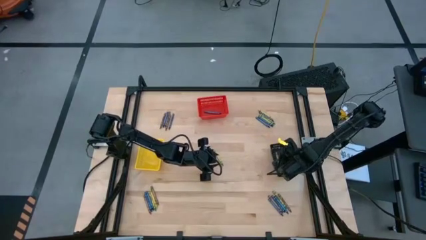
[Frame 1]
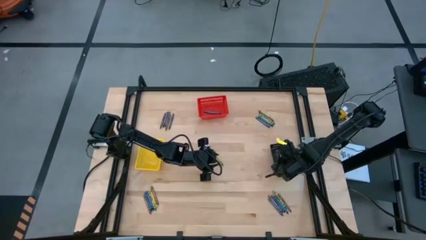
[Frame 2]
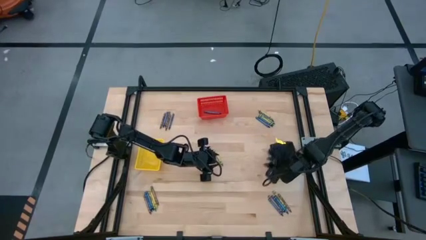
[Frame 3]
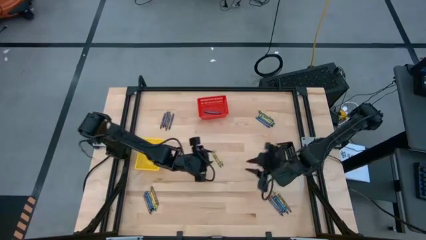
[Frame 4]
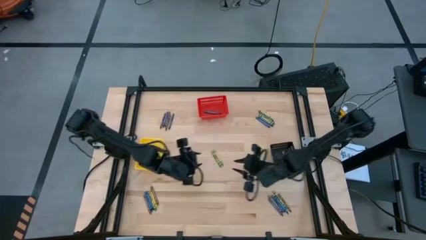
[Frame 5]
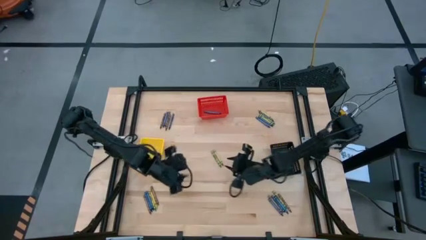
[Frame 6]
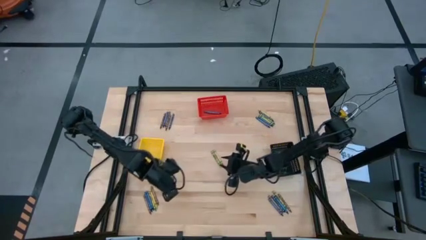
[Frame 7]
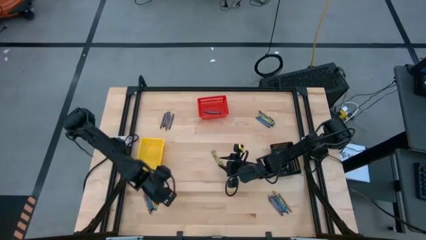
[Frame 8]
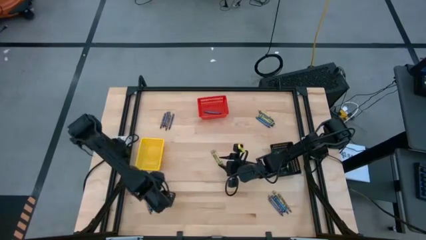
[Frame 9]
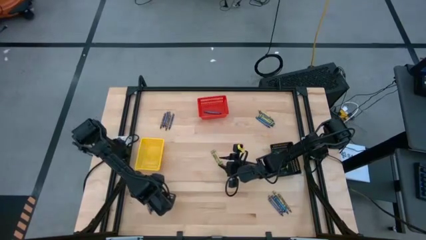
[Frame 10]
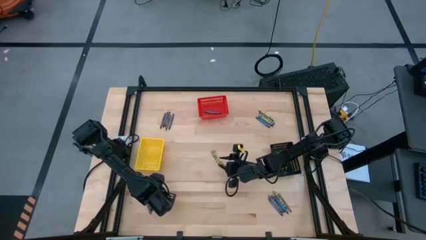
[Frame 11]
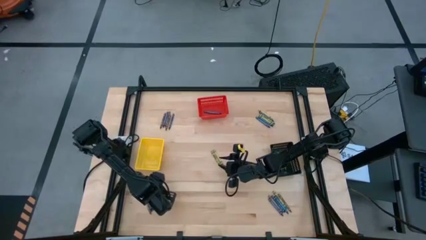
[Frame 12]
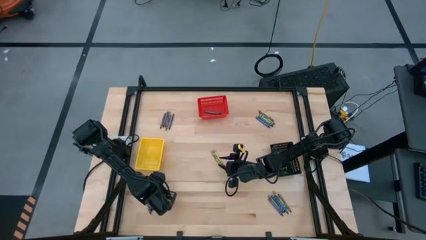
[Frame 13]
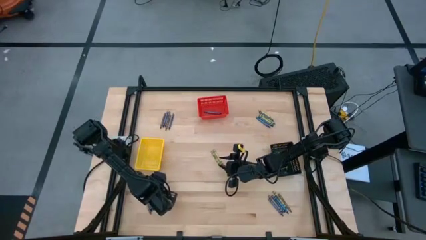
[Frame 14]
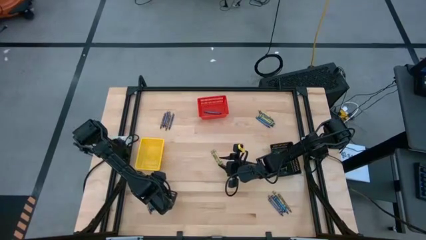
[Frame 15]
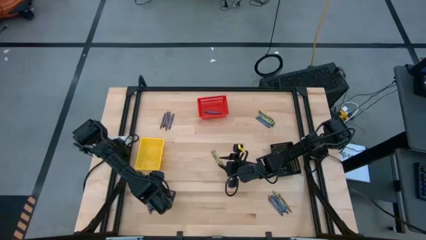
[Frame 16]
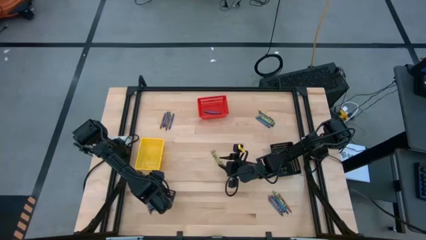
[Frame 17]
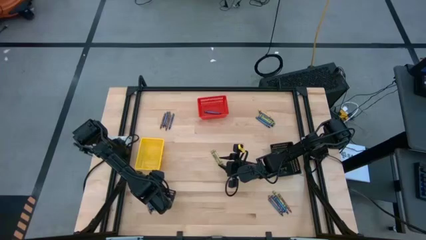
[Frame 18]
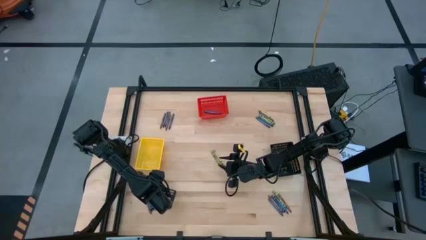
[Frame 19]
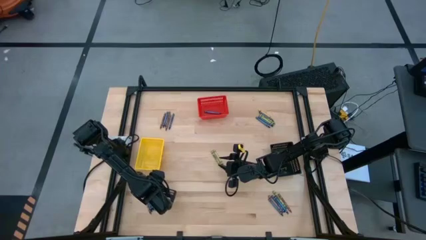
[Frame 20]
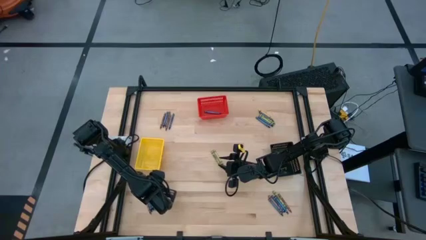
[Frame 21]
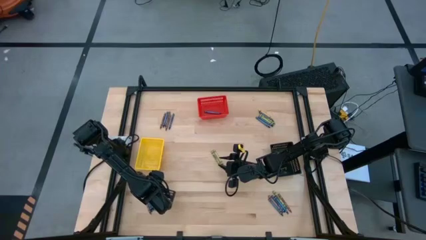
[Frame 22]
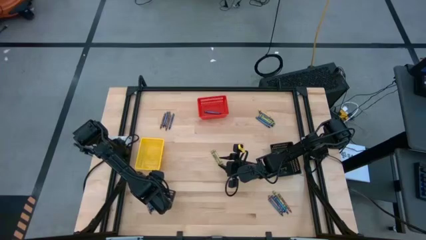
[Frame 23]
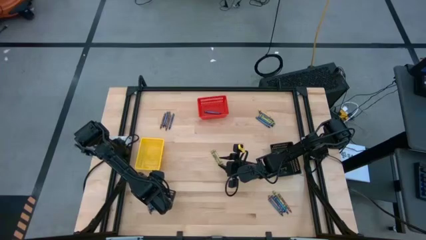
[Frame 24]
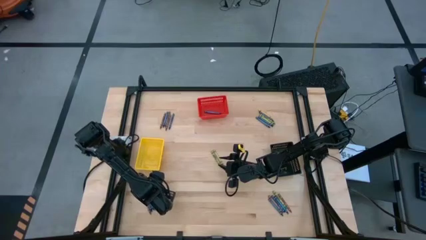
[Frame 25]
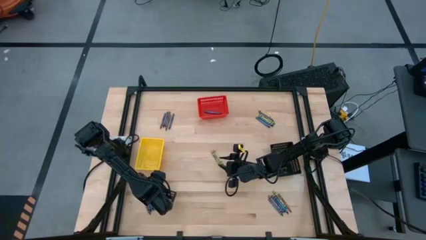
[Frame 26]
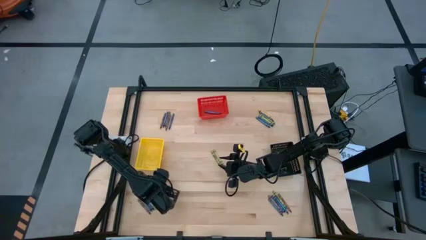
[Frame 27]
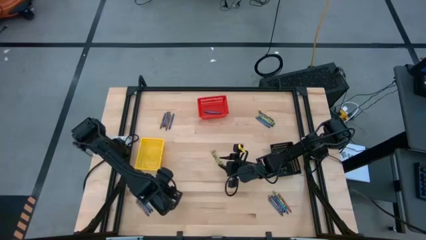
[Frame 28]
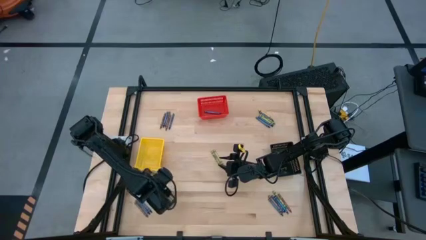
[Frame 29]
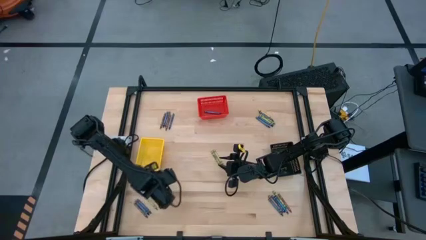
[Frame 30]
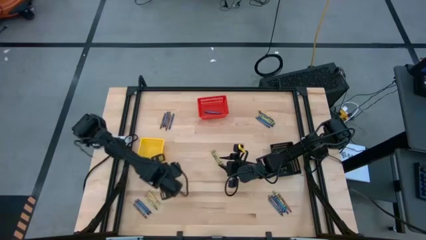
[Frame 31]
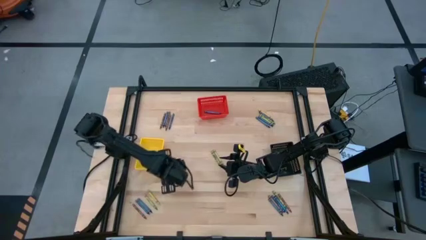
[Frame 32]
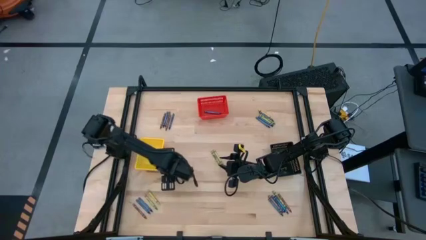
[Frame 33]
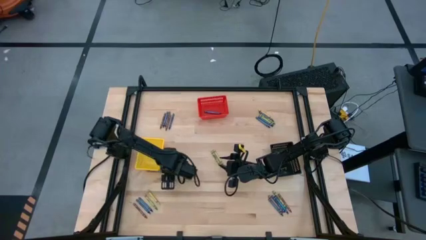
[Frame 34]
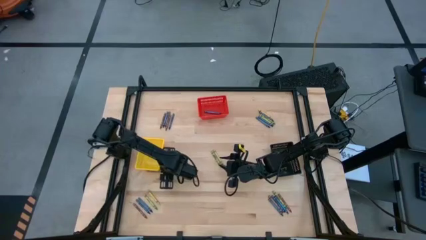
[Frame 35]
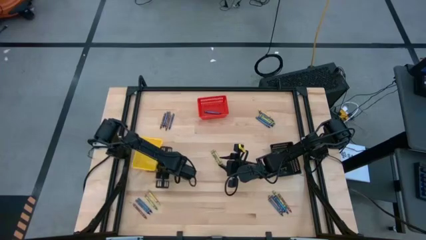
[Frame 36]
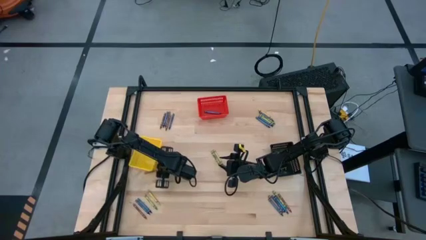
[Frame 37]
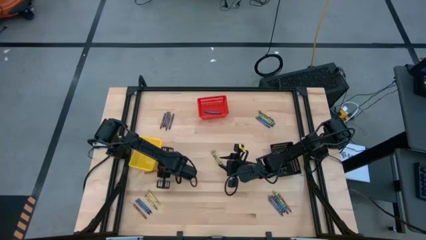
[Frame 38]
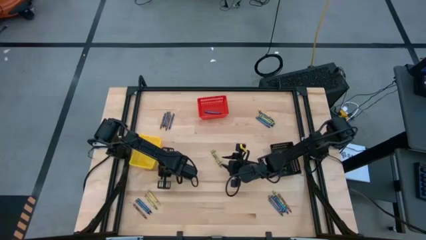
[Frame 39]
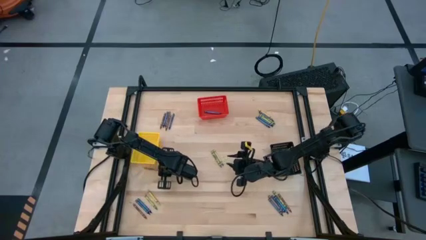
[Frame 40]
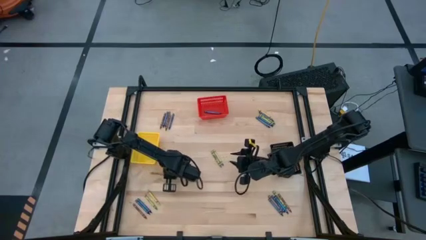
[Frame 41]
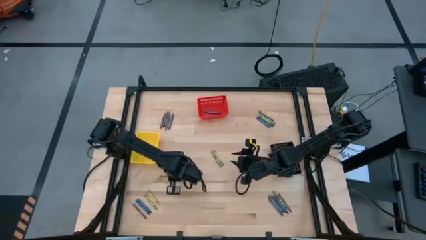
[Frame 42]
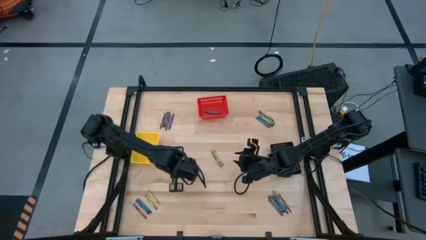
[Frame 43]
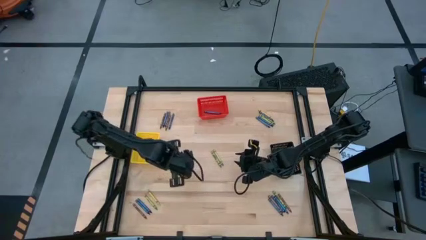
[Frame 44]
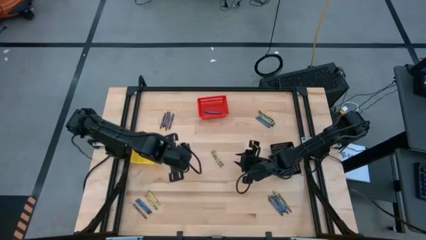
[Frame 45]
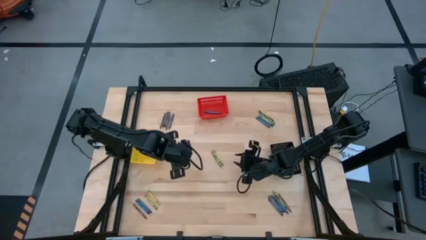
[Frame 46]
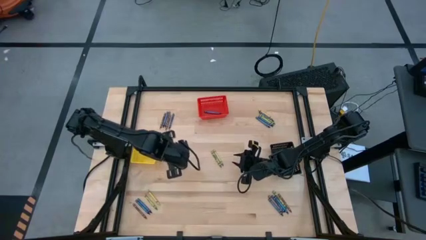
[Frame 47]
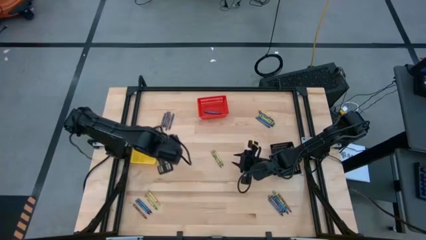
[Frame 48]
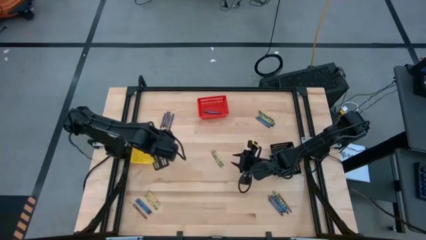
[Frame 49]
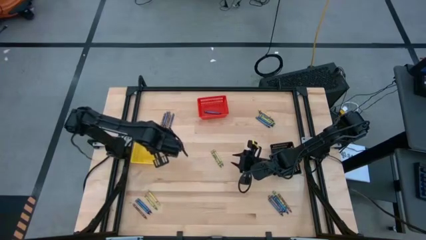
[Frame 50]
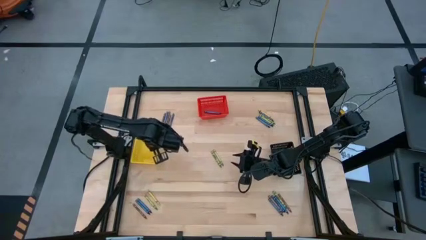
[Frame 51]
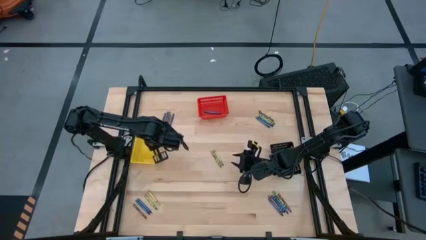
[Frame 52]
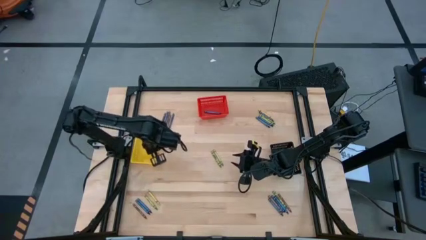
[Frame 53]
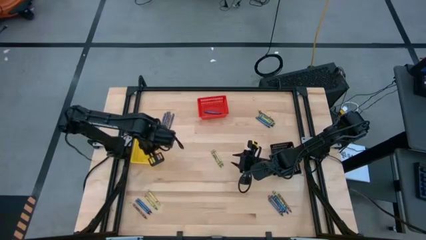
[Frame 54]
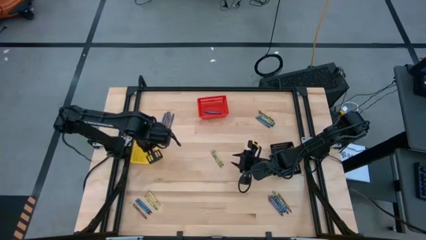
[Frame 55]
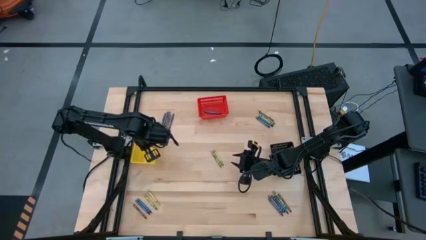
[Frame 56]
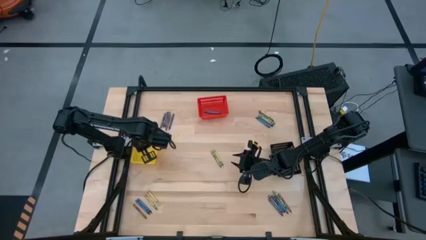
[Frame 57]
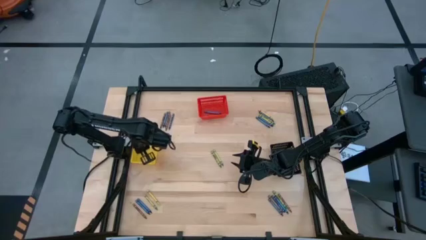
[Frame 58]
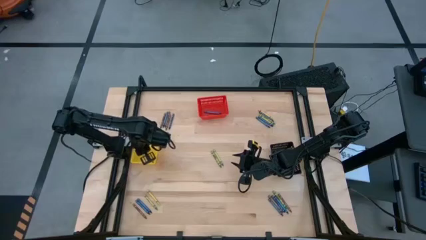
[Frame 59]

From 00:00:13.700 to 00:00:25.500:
Task: Sort crayons
Put the brown crayon into the yellow basket

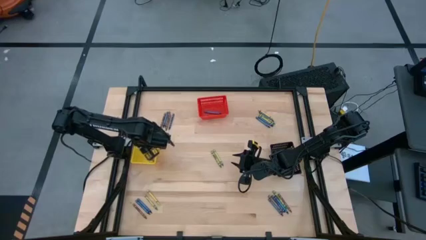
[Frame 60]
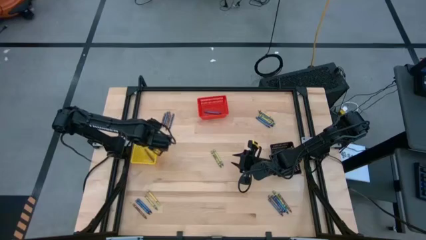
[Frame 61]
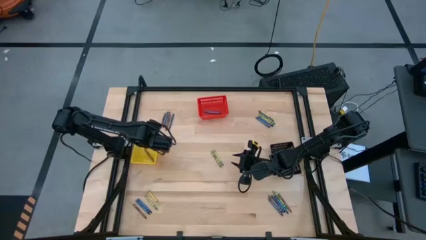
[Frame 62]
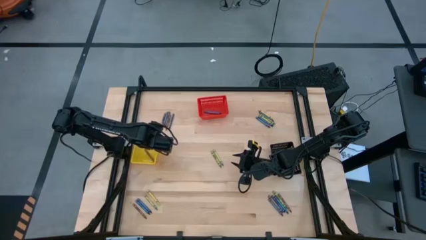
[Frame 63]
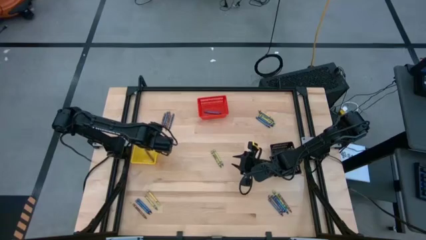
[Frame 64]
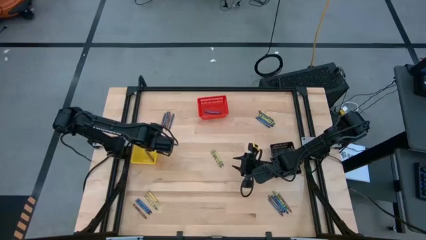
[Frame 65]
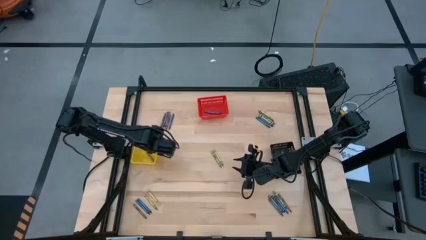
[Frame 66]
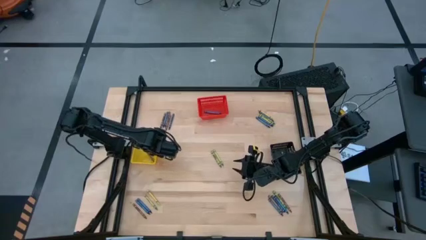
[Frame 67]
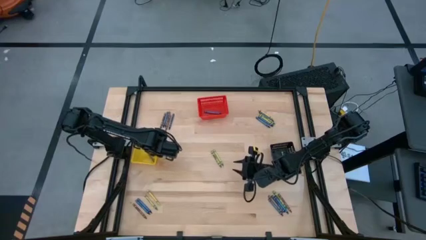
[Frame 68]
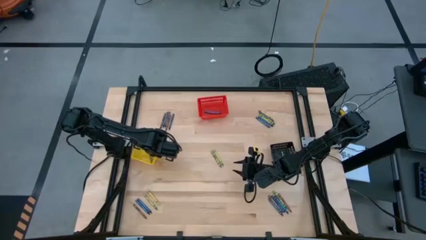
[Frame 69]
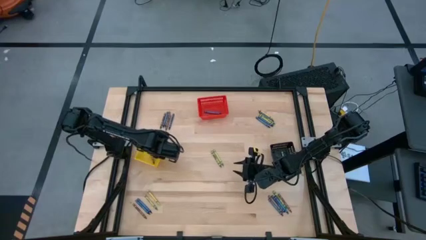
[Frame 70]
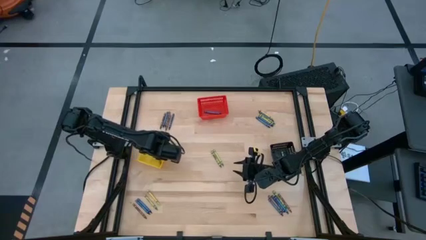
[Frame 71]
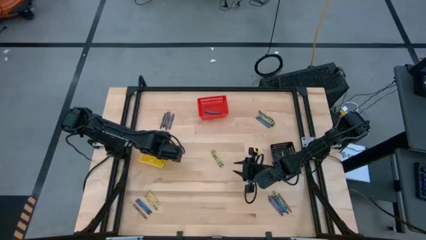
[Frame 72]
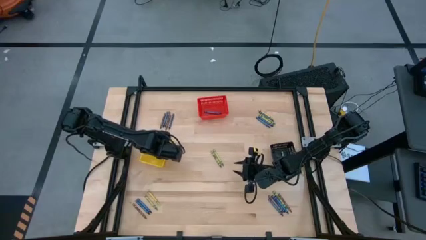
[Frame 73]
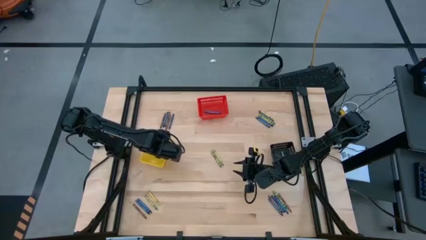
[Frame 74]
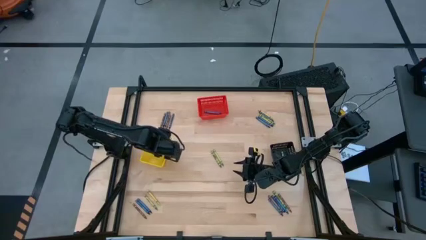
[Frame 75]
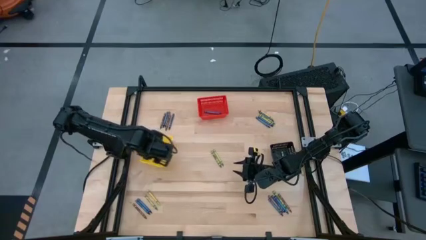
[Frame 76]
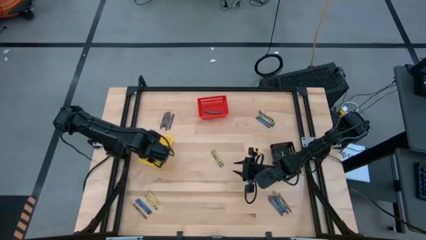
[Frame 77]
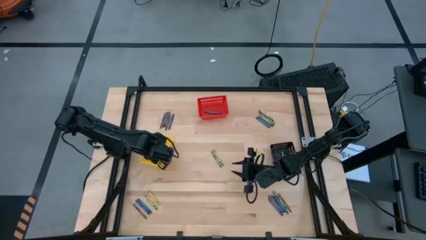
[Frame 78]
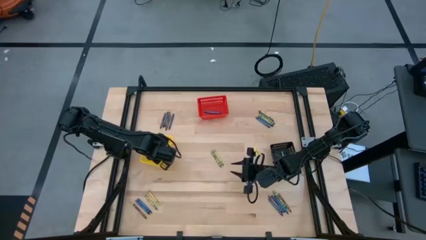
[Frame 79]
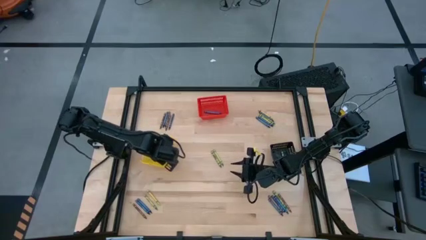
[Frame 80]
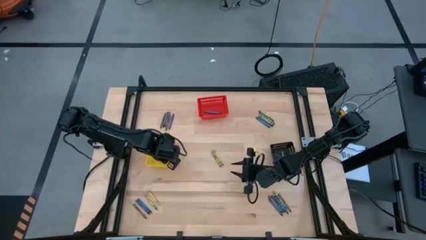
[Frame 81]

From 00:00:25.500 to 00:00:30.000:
Adjust the yellow basket
